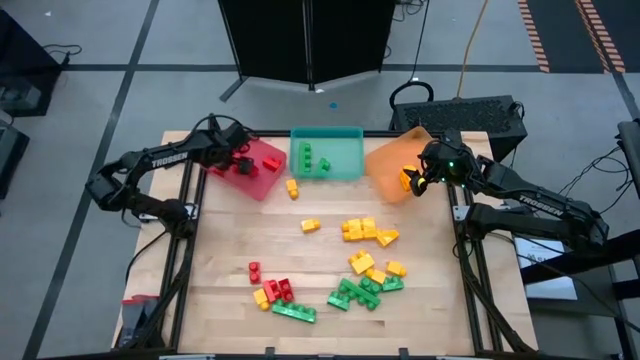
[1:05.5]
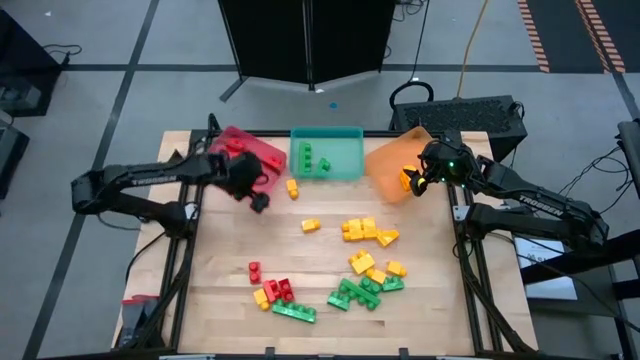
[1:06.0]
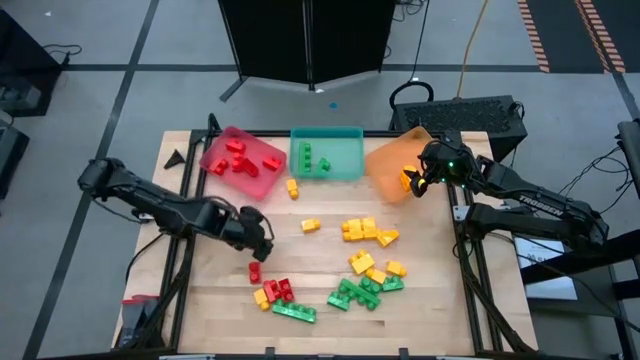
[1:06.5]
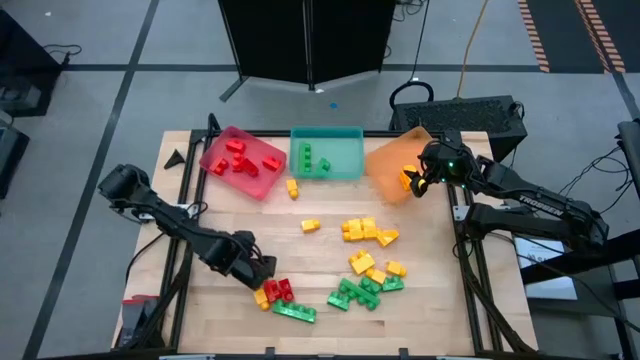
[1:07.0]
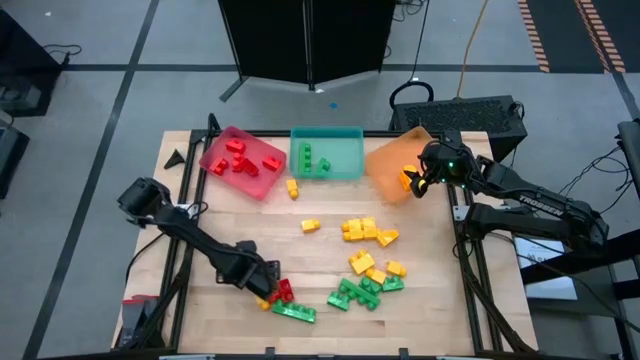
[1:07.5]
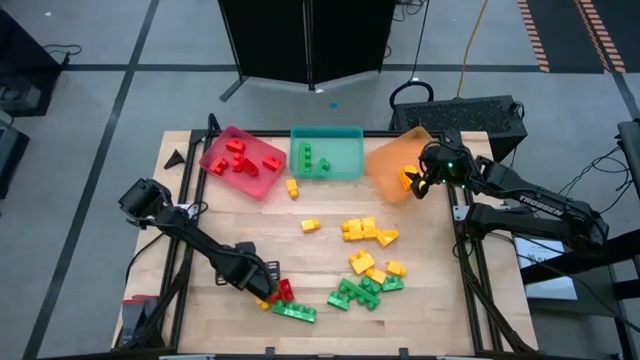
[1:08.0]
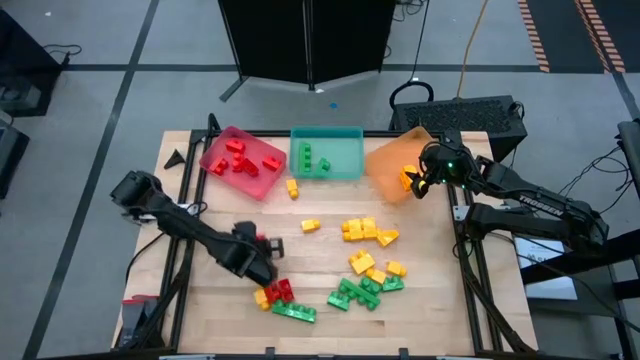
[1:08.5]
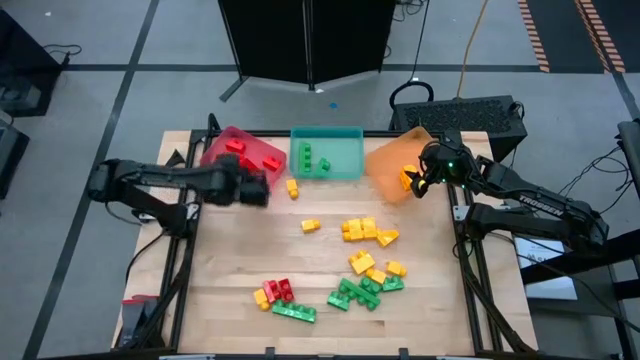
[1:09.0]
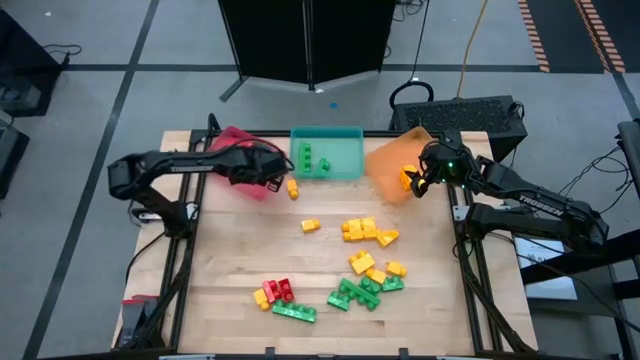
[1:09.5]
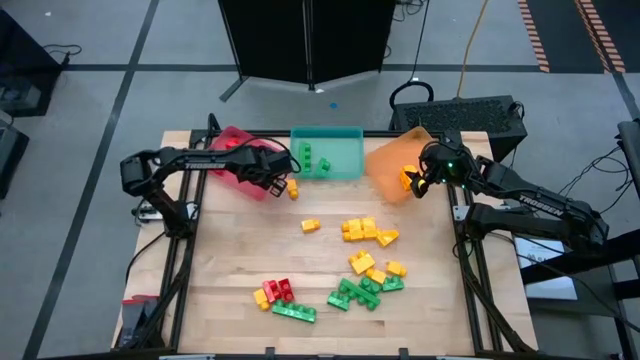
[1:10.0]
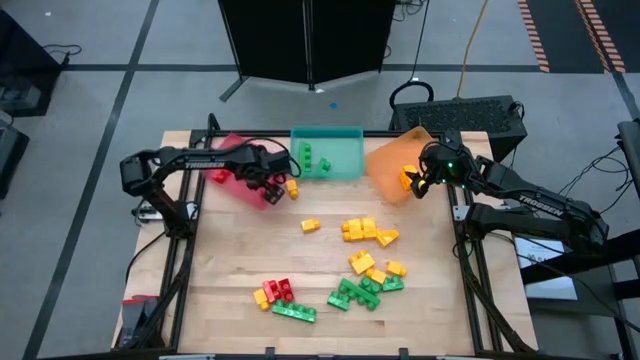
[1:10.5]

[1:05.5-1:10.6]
Task: Sort blocks
Put the red game piece into the red bin

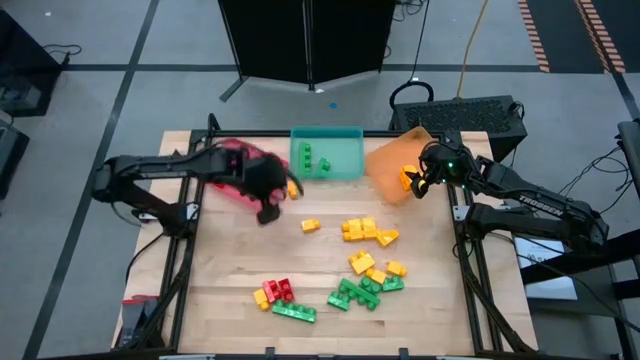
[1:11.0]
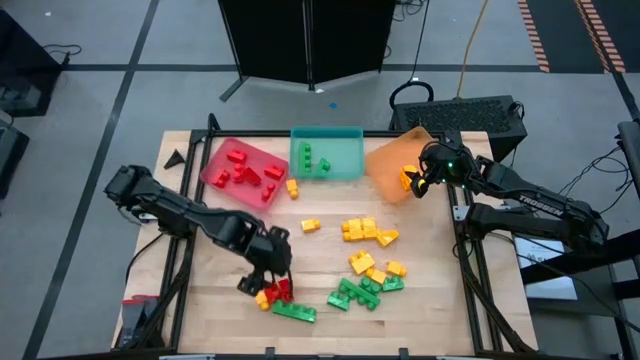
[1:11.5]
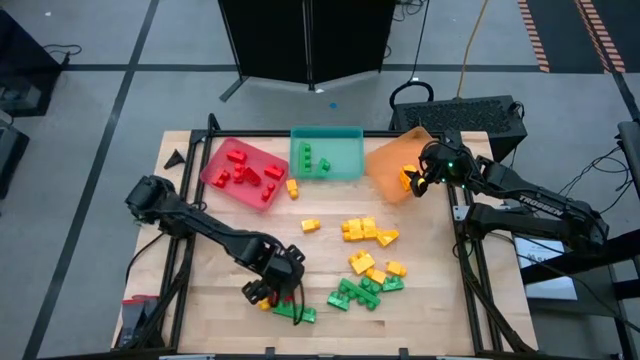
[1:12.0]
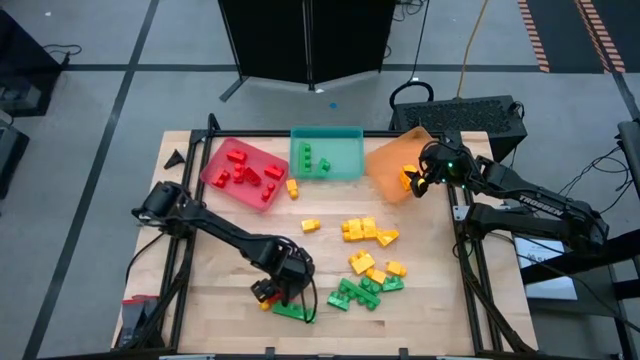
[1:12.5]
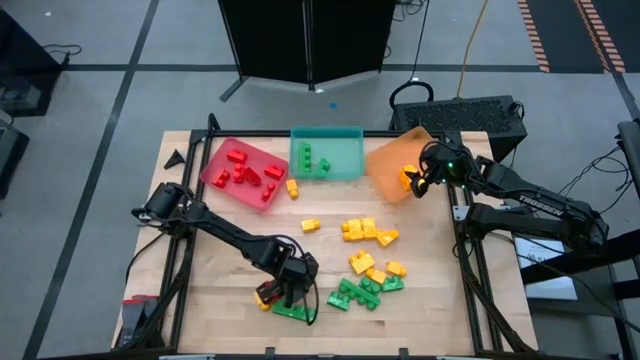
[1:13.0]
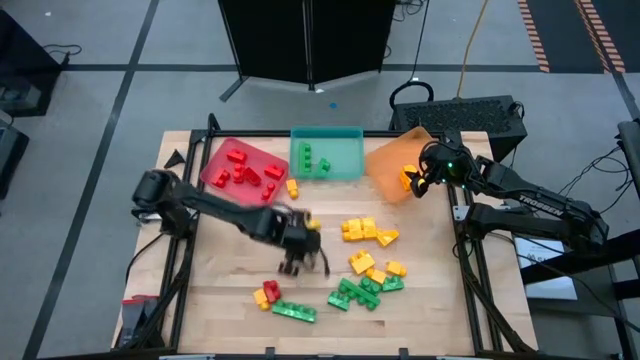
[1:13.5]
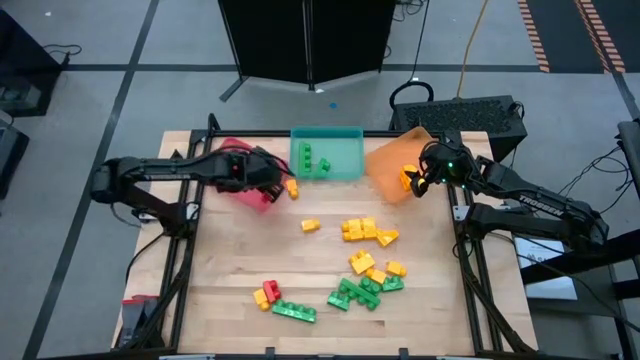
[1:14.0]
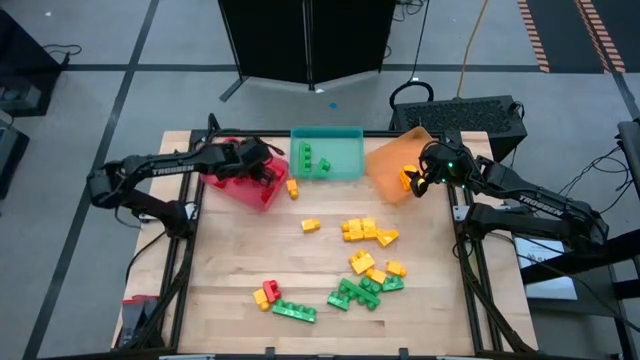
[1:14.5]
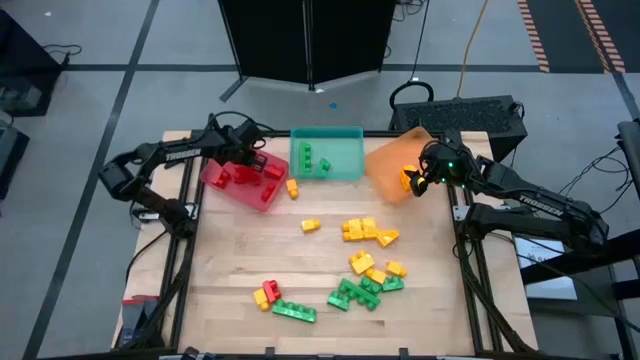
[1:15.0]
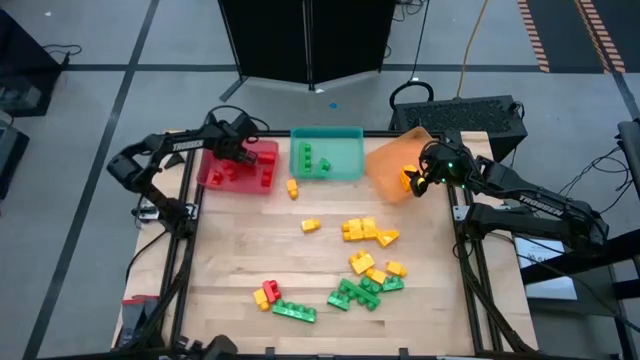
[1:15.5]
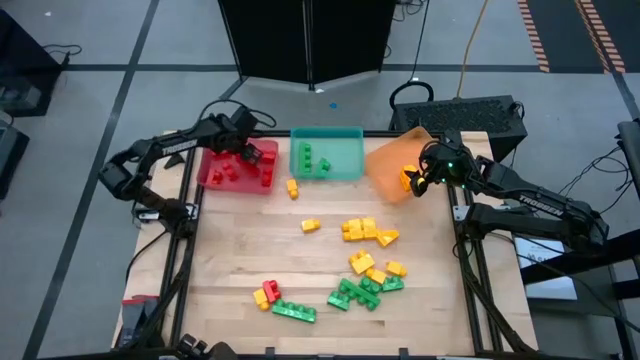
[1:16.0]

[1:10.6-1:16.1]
Put the red game piece into the red bin

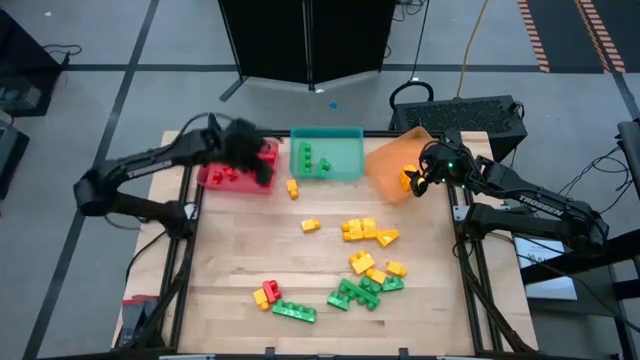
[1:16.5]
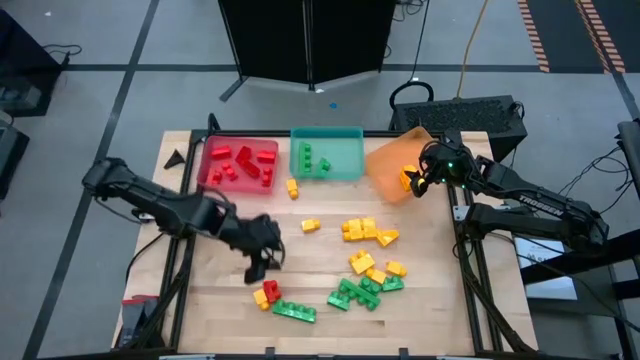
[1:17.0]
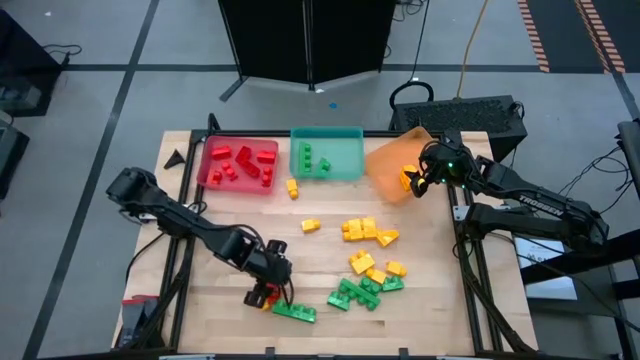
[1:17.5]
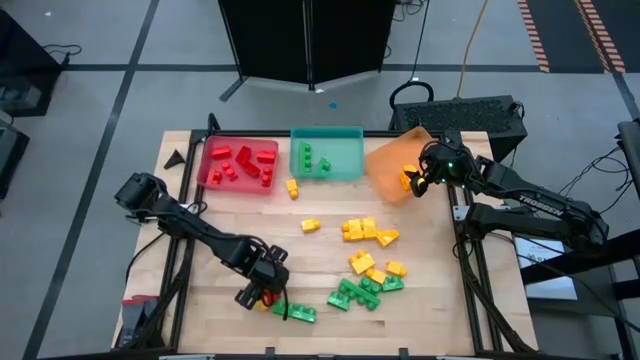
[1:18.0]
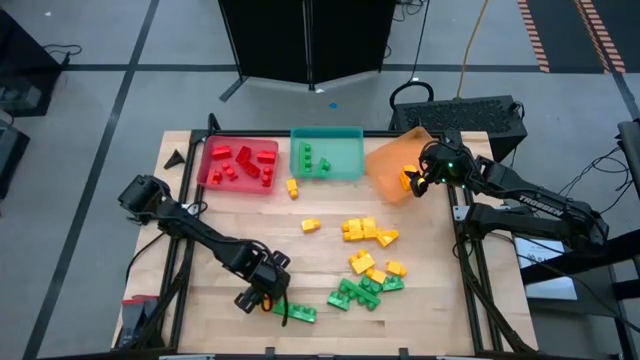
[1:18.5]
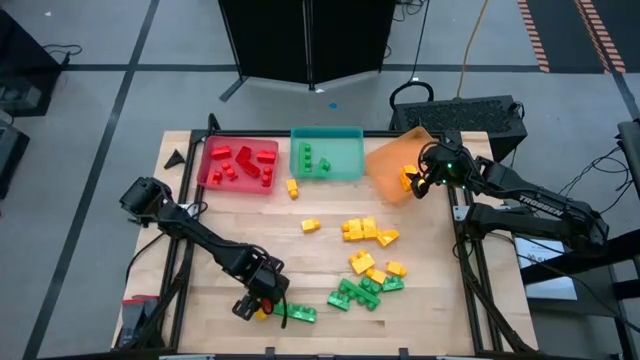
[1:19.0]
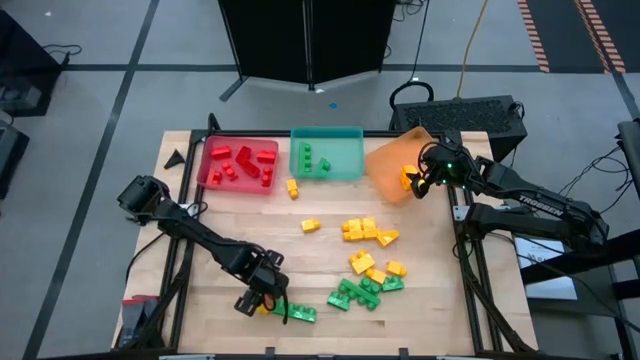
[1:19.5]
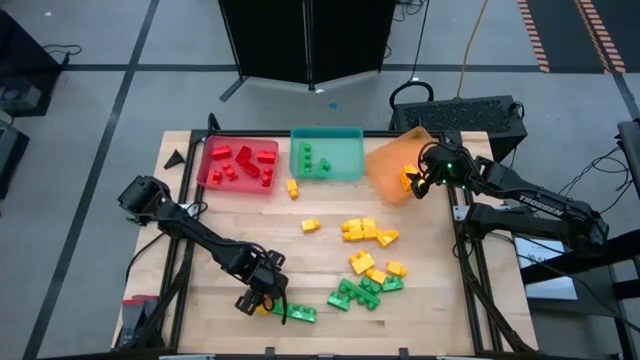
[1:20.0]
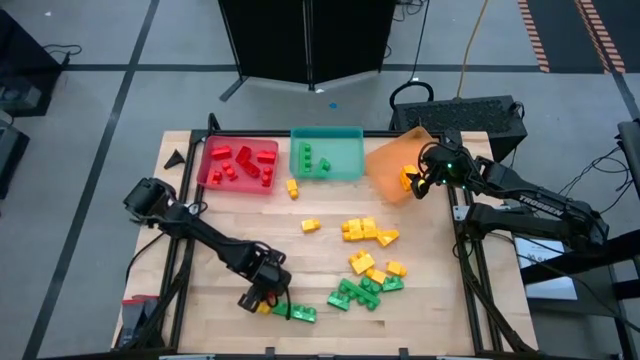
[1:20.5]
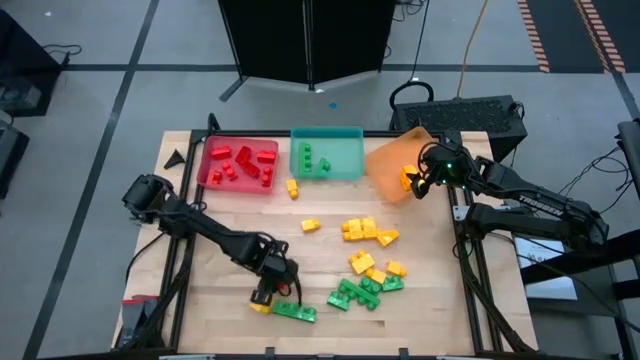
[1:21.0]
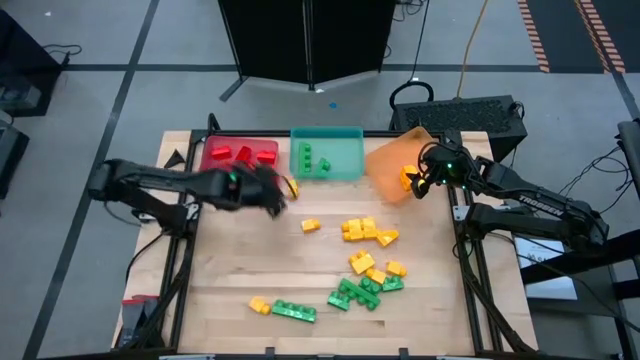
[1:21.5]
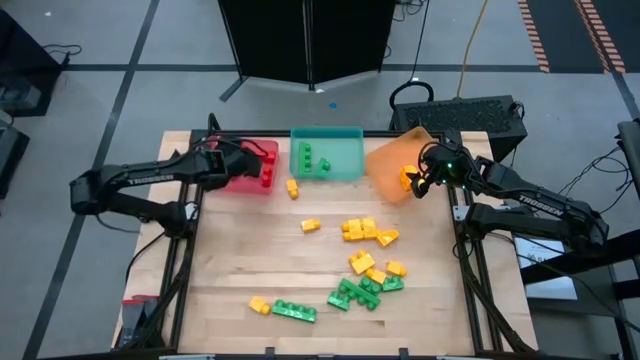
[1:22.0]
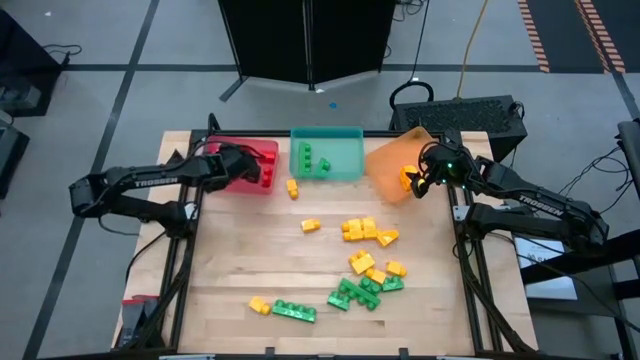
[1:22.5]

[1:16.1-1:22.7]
Put the red game piece into the red bin

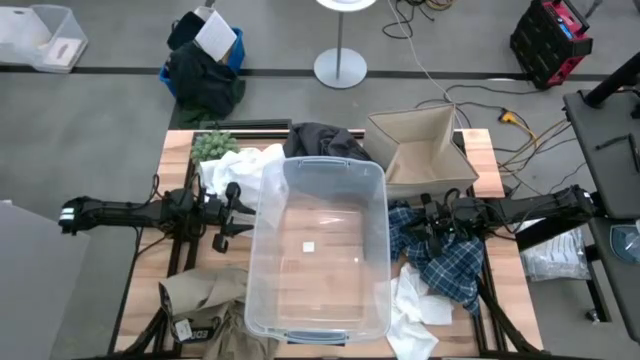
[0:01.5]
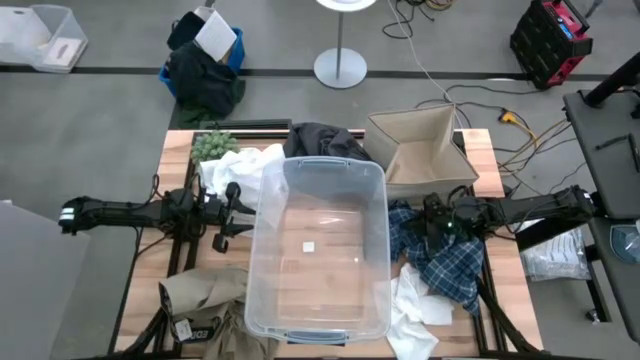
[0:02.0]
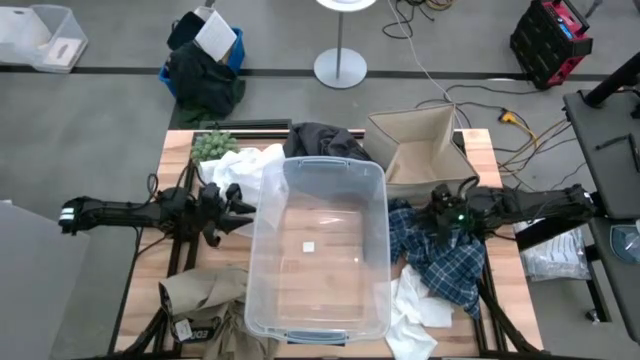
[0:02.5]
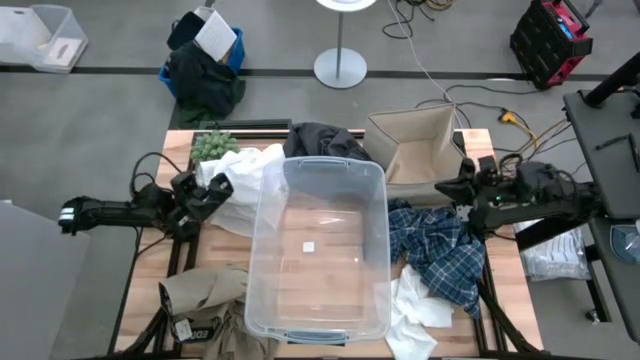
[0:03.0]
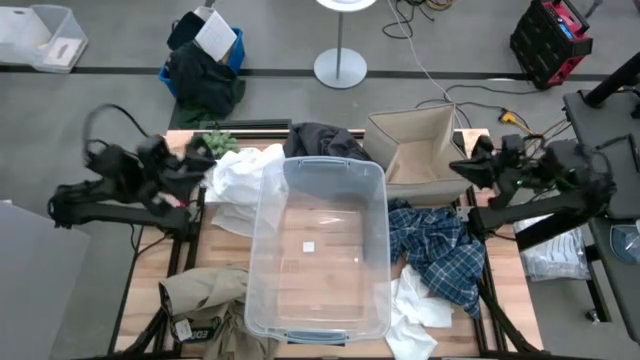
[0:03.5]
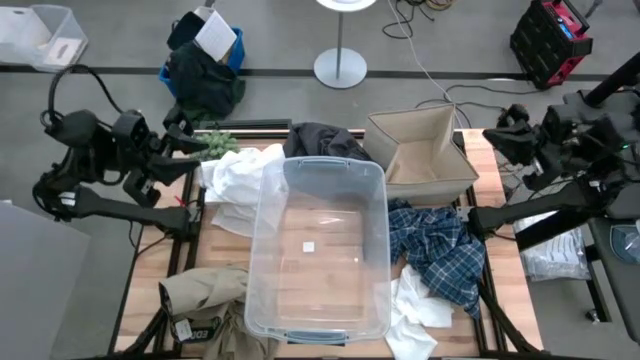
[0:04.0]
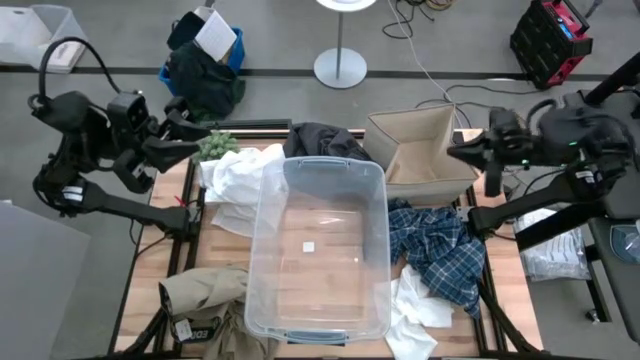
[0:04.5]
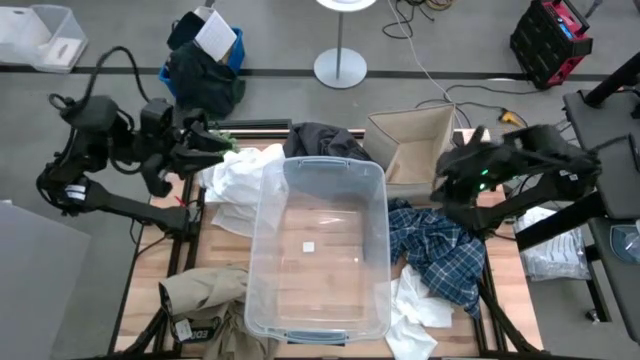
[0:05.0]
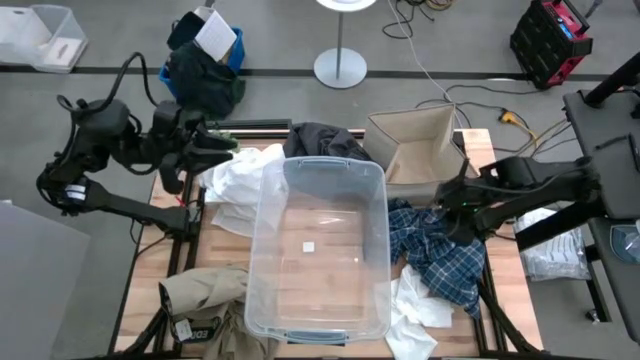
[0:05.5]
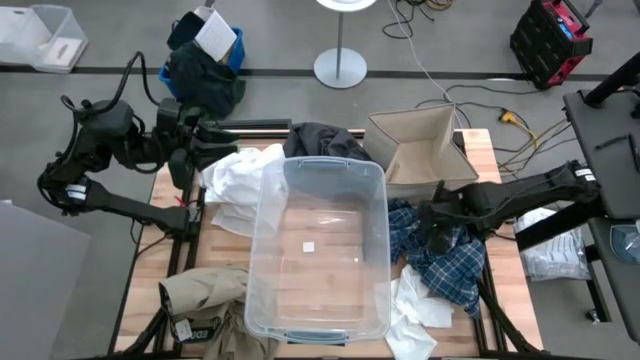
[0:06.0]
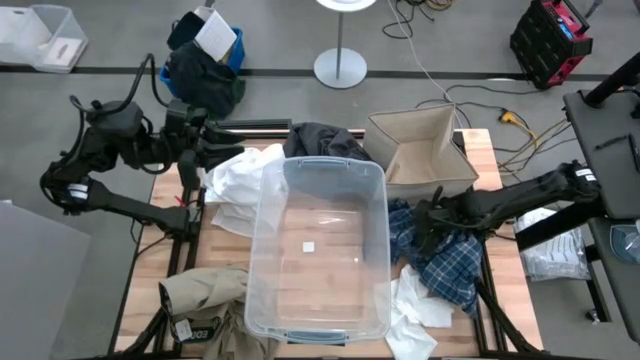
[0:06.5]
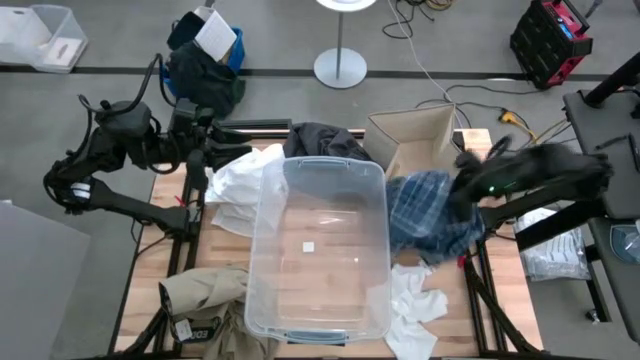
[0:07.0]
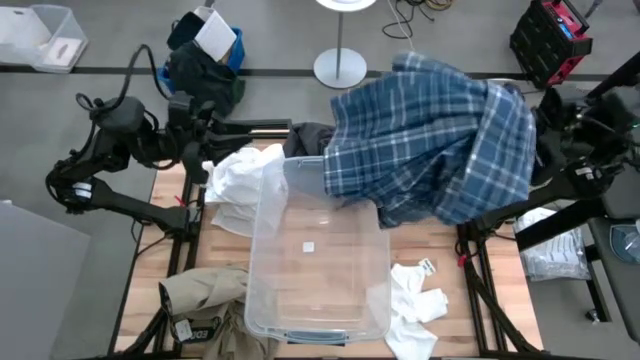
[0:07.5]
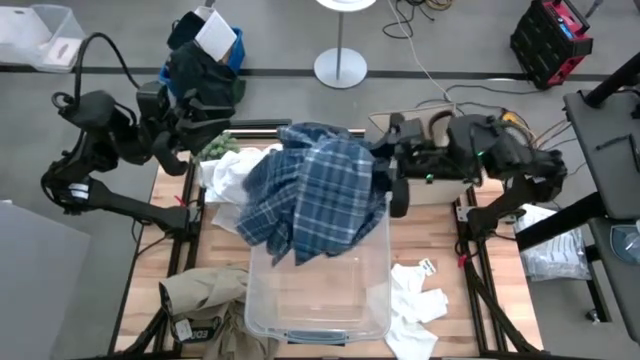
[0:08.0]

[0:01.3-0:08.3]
Task: Sort clothes
Put the blue checkered polo into the transparent bin
